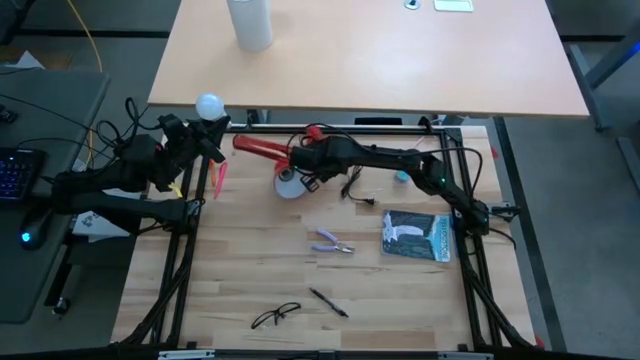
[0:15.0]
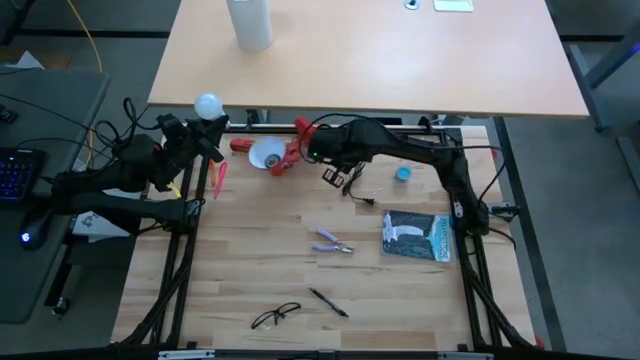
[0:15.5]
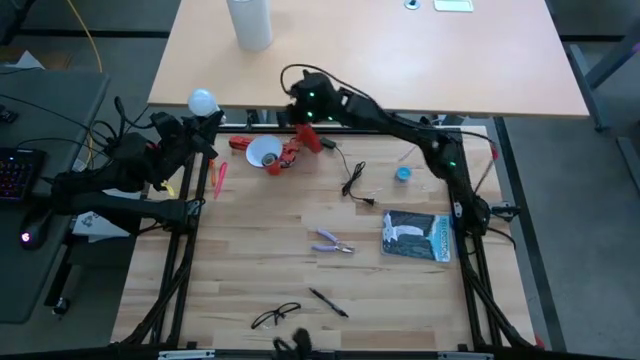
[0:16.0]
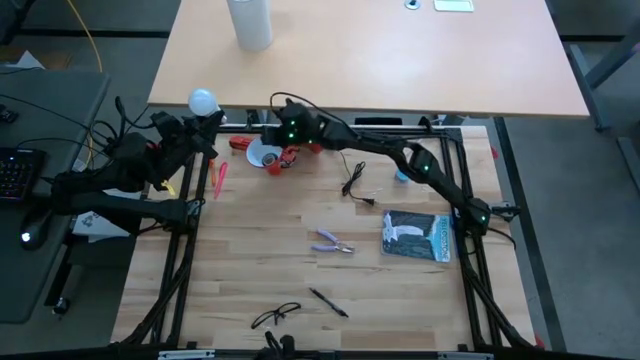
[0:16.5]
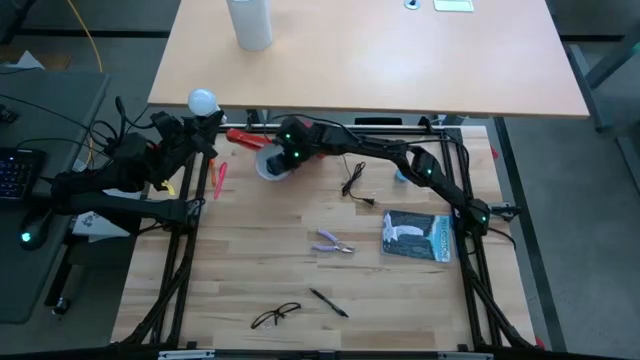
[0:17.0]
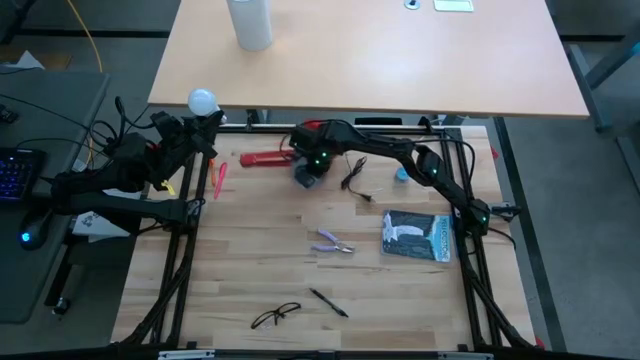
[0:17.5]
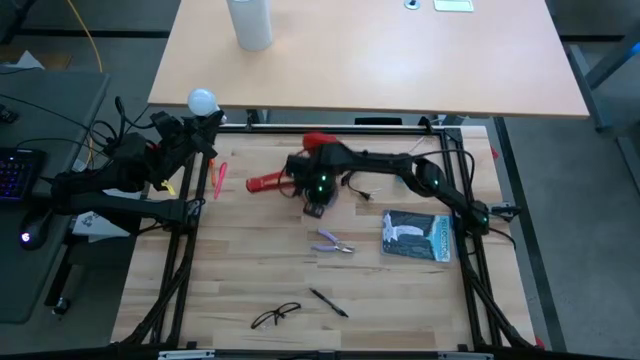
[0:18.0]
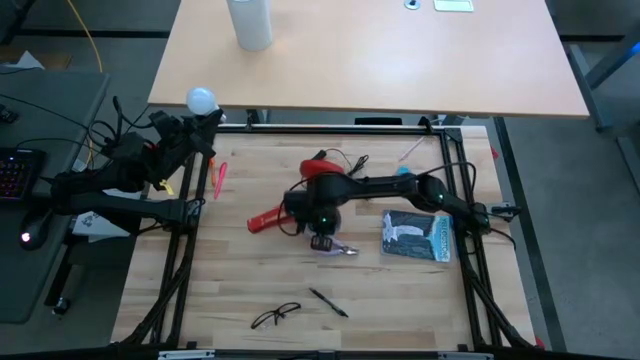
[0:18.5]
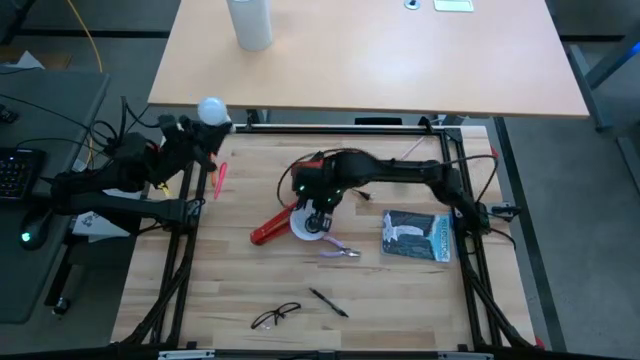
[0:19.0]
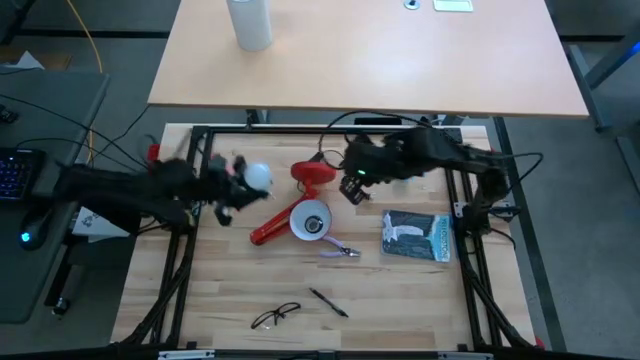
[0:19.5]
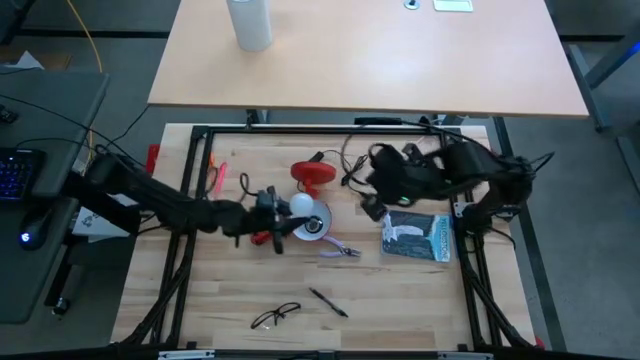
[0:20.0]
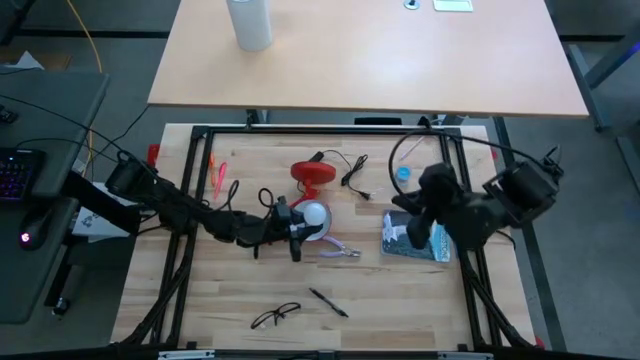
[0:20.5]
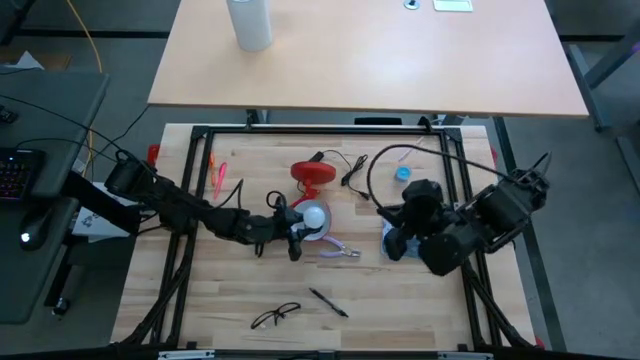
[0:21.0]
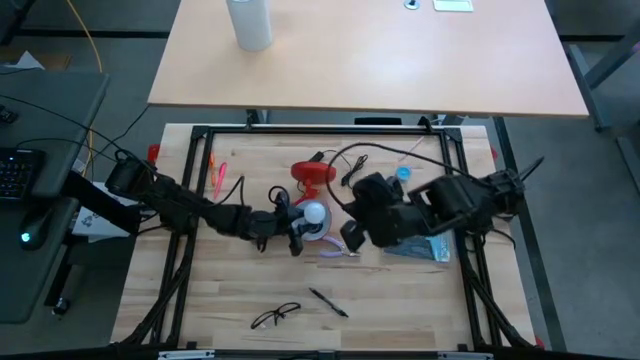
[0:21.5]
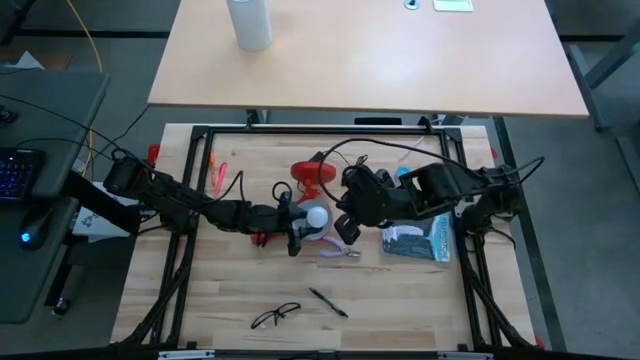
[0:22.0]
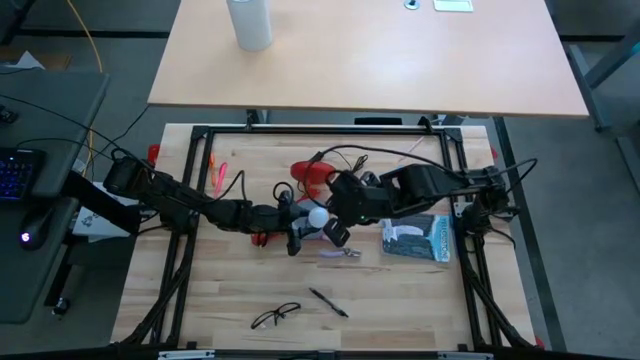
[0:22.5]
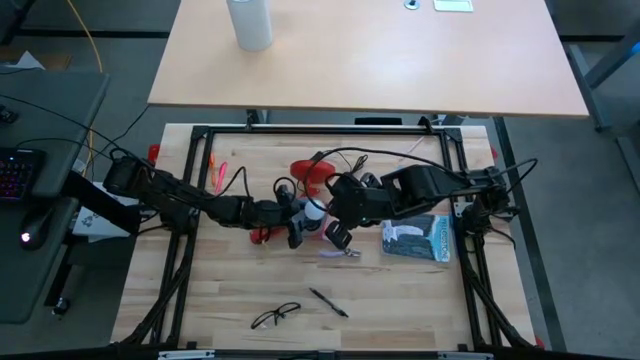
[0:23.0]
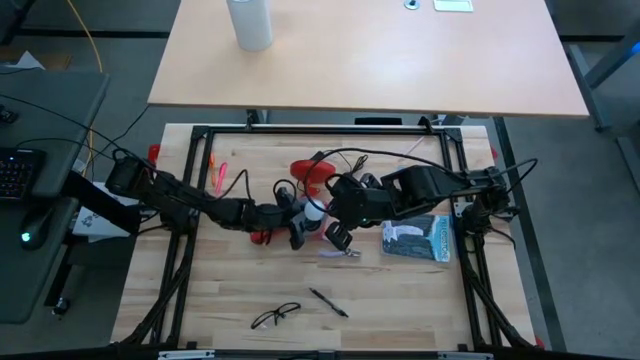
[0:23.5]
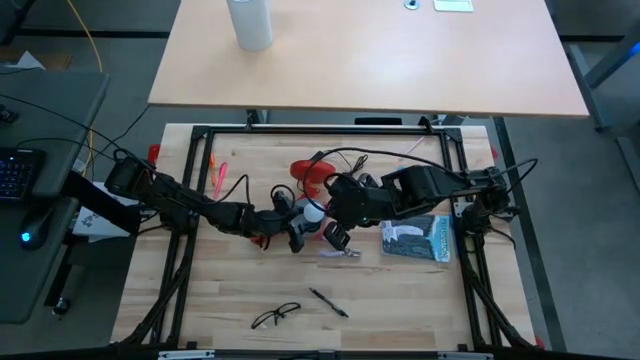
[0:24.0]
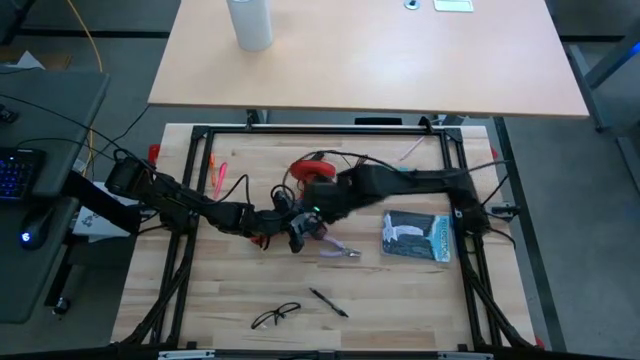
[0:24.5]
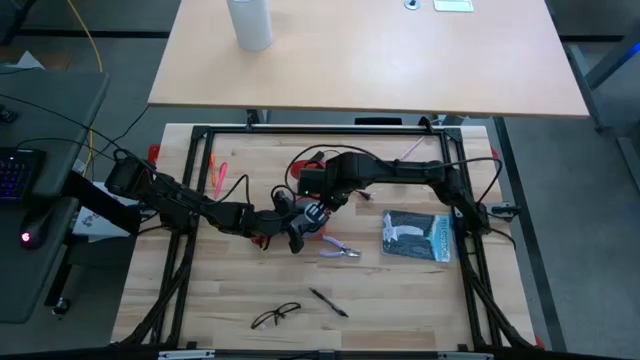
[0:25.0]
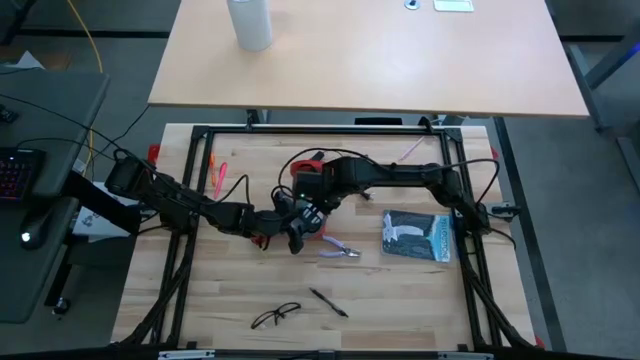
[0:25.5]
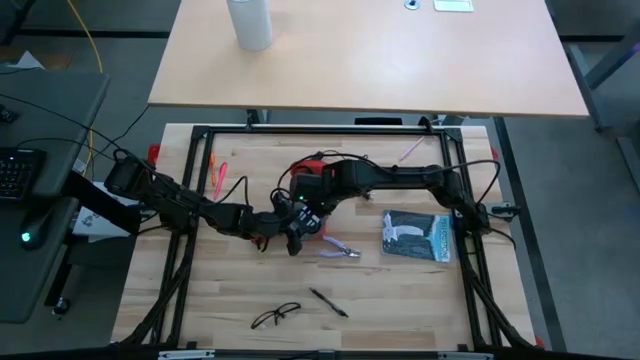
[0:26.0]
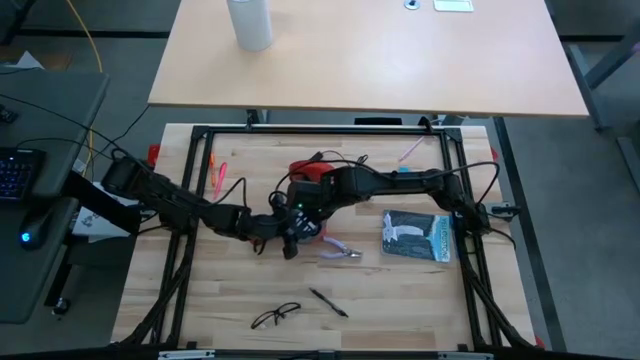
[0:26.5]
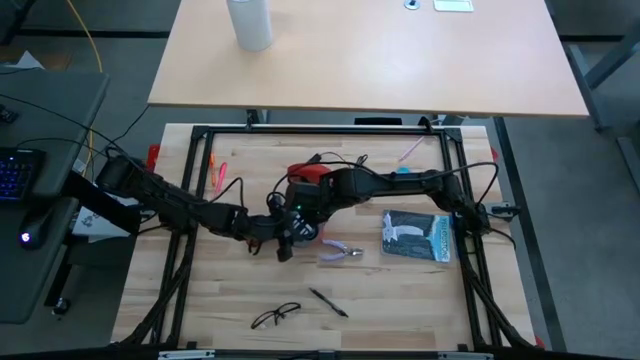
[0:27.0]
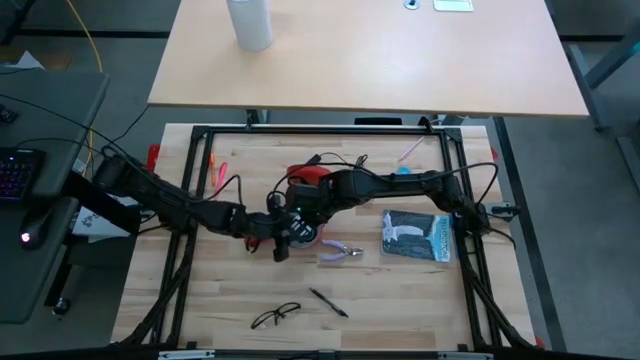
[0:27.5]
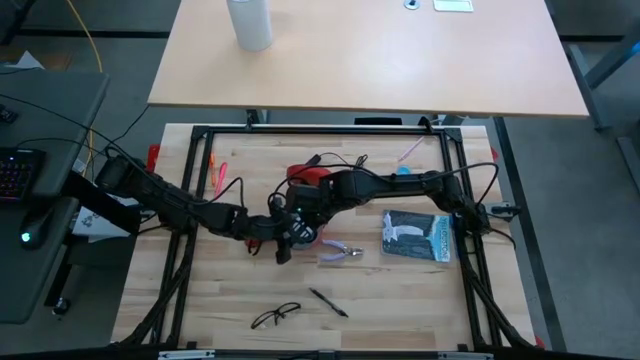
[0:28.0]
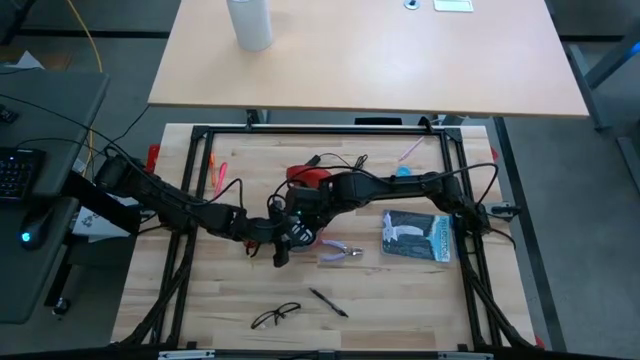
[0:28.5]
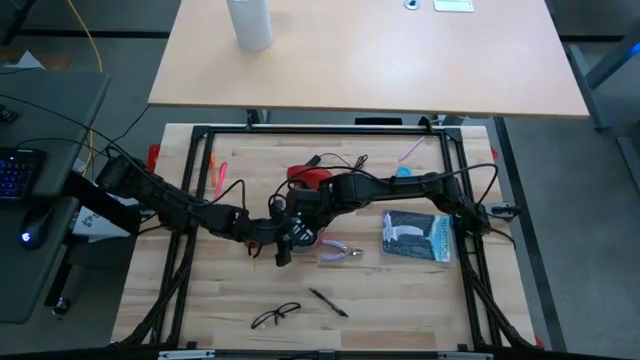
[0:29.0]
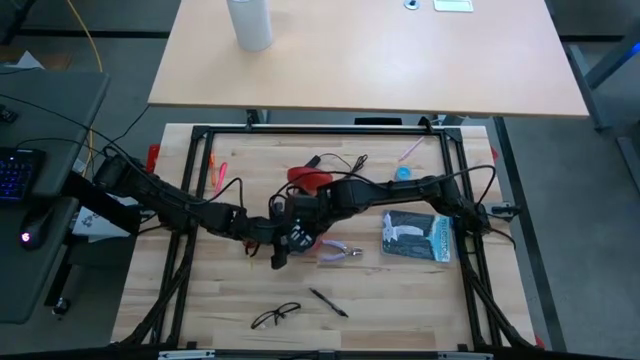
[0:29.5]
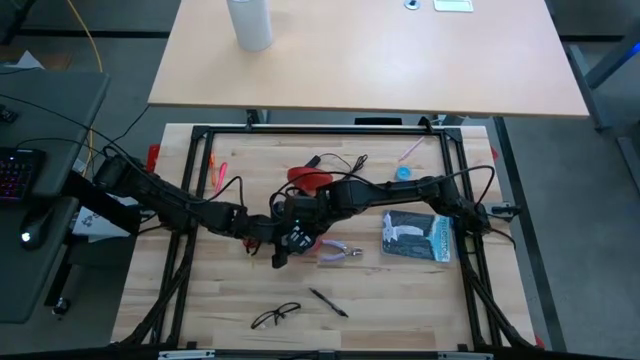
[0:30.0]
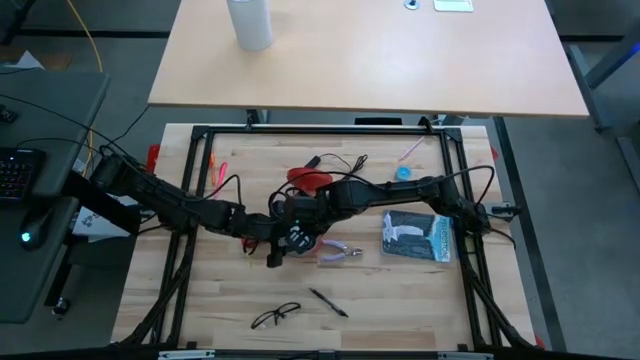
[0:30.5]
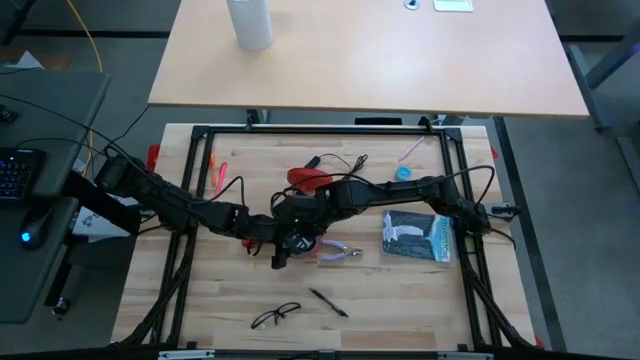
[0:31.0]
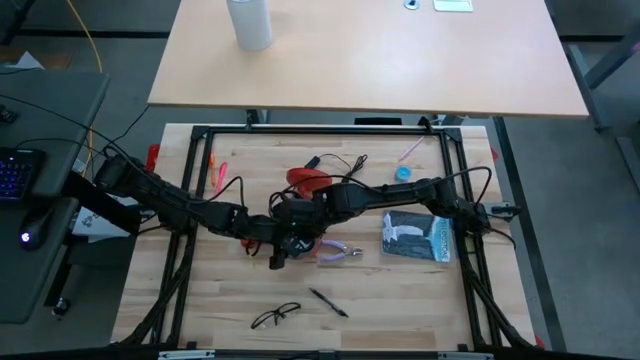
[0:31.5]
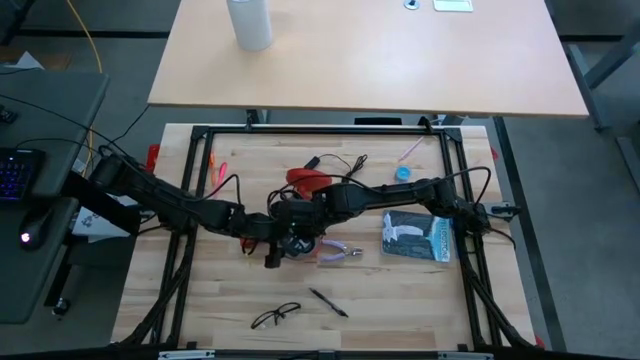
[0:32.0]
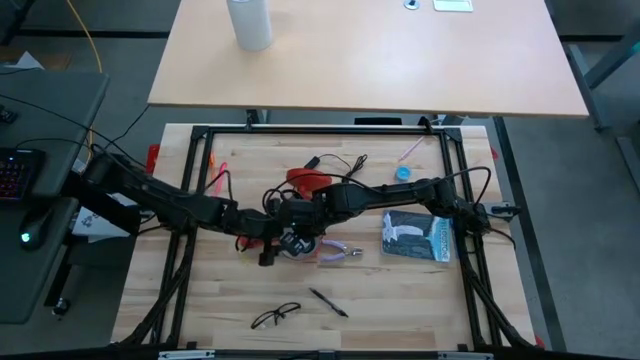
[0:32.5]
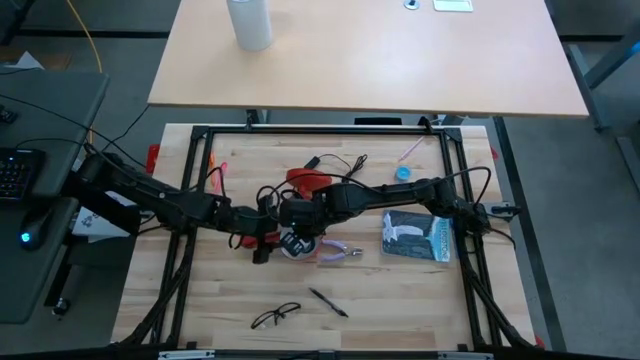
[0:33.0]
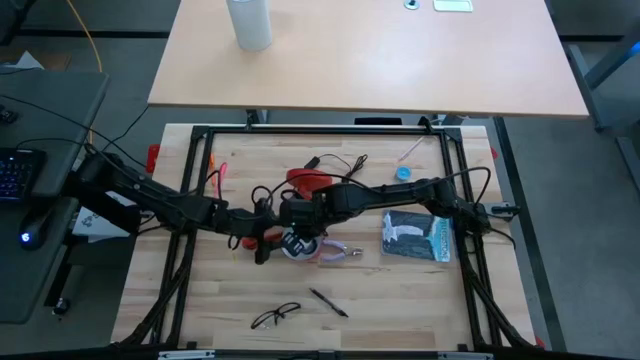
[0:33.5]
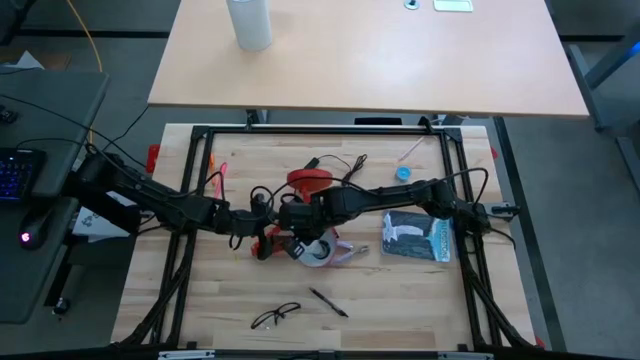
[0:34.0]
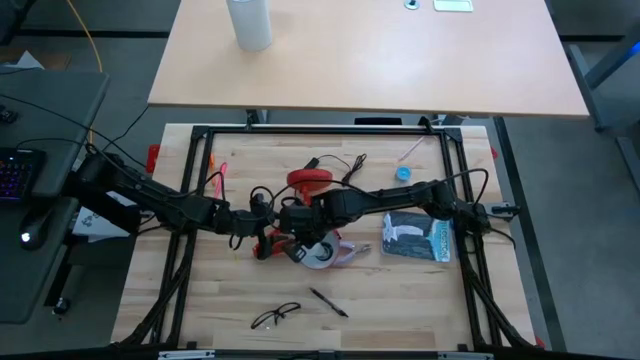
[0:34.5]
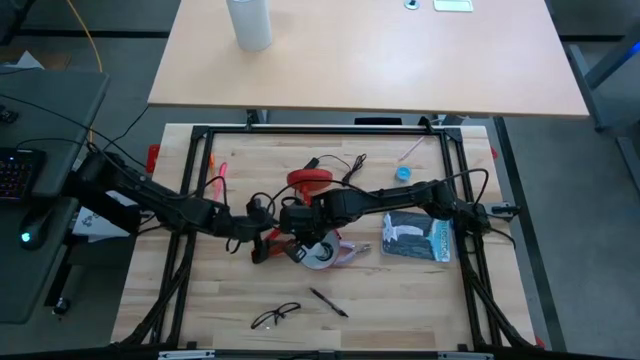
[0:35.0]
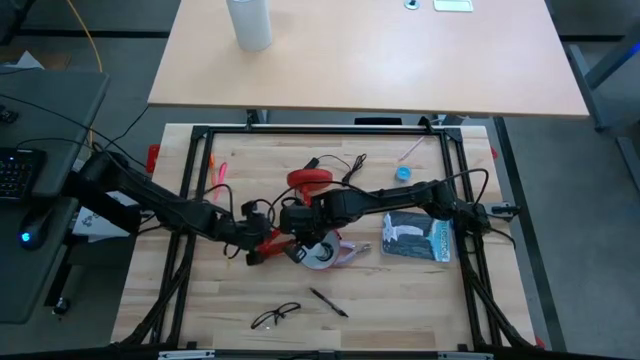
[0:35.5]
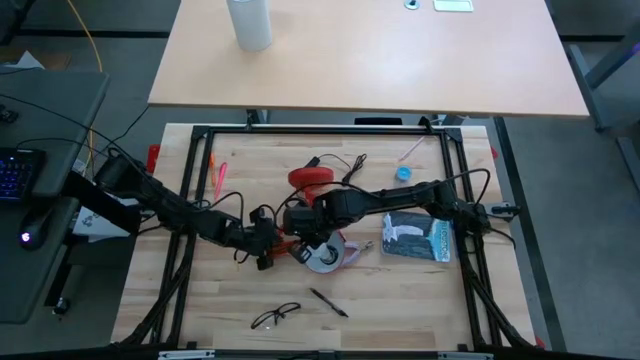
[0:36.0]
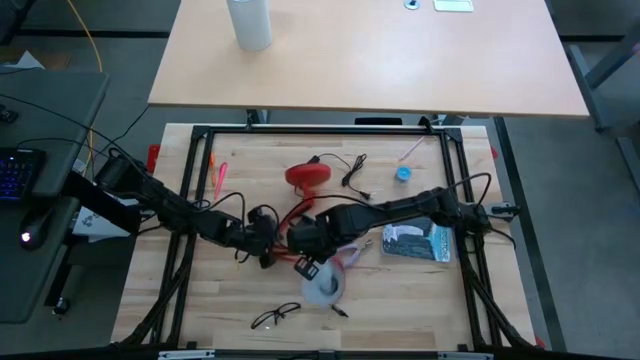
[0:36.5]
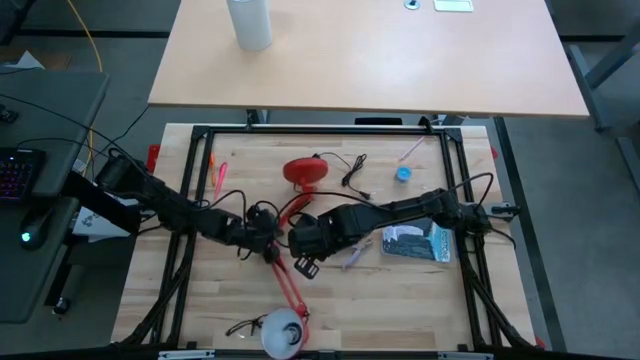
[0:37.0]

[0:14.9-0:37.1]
Task: Screw lightbulb
Insert the lightbulb into the desk lamp
